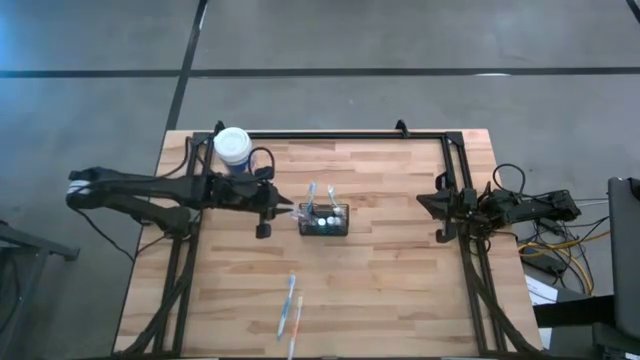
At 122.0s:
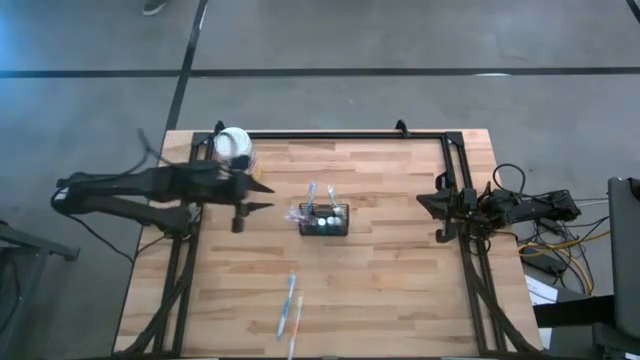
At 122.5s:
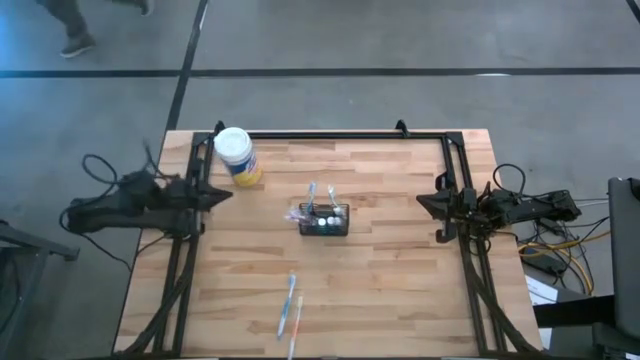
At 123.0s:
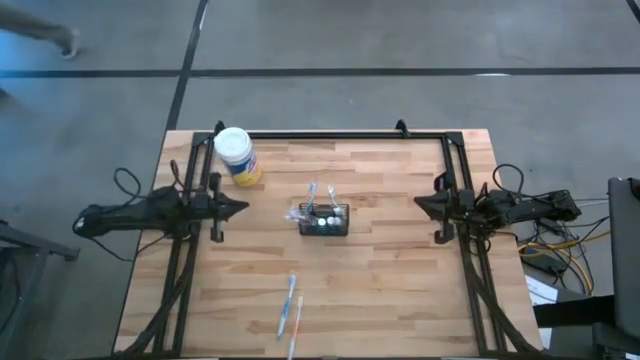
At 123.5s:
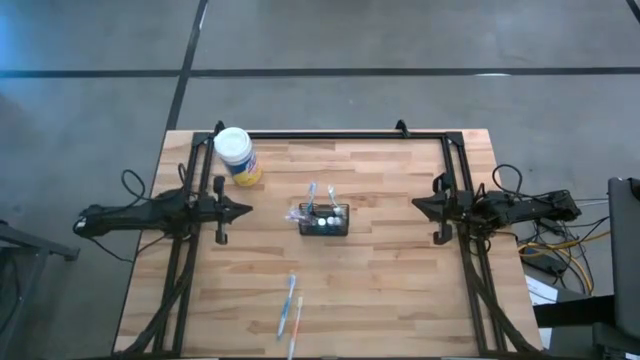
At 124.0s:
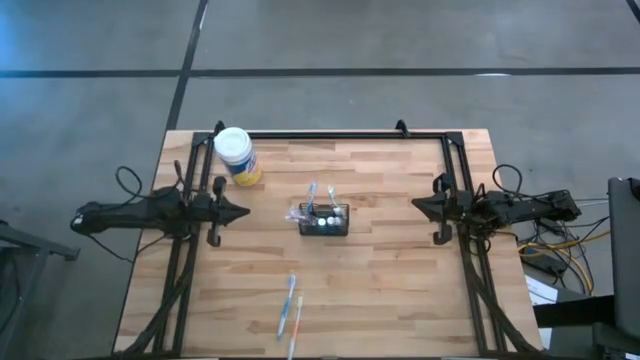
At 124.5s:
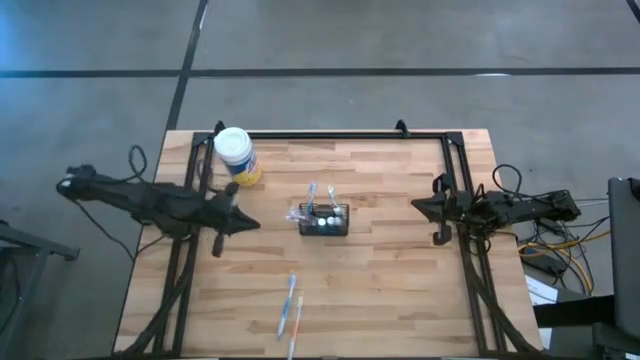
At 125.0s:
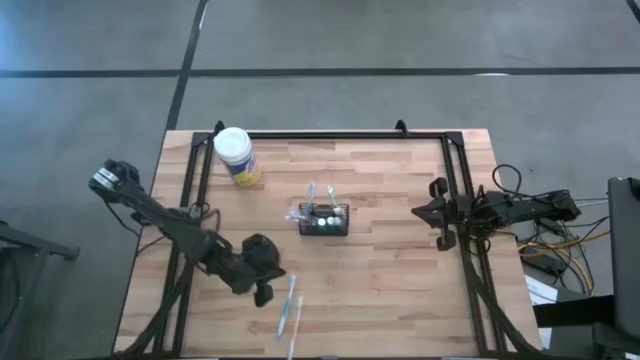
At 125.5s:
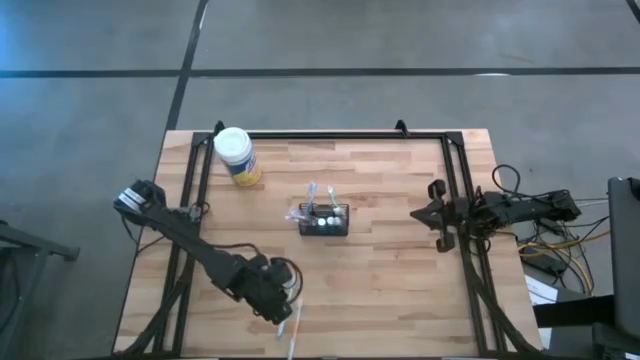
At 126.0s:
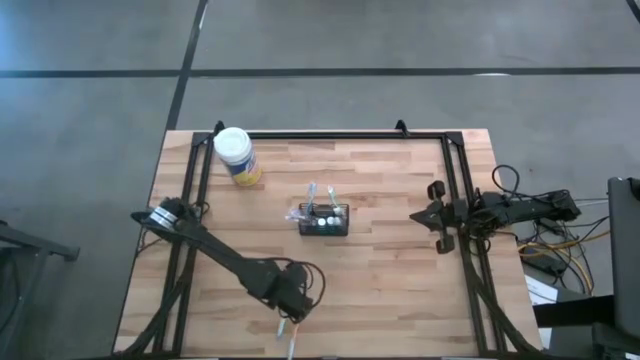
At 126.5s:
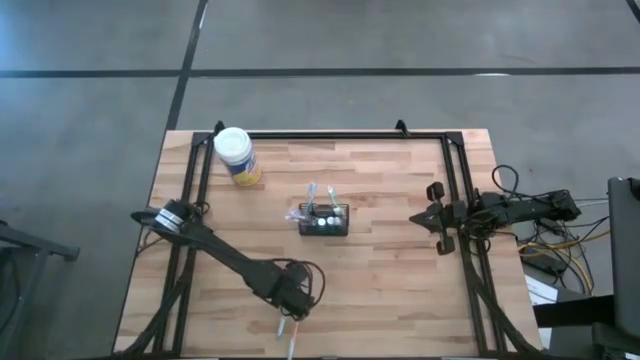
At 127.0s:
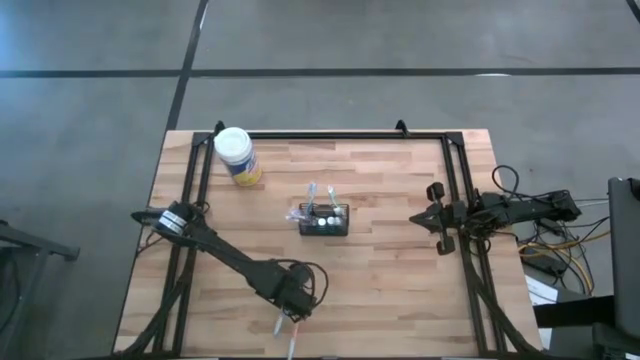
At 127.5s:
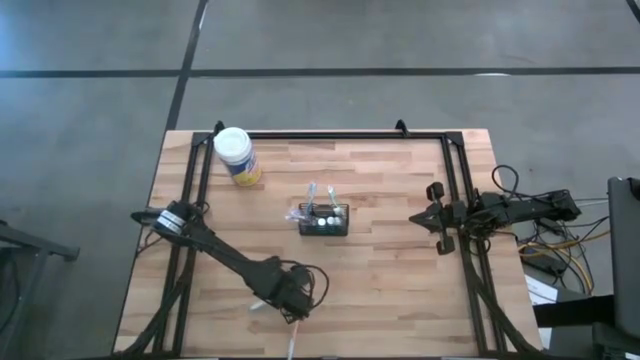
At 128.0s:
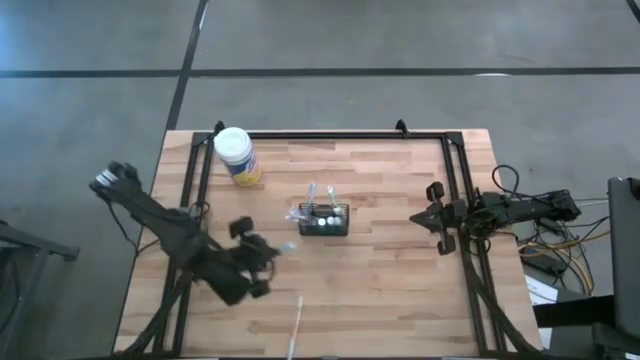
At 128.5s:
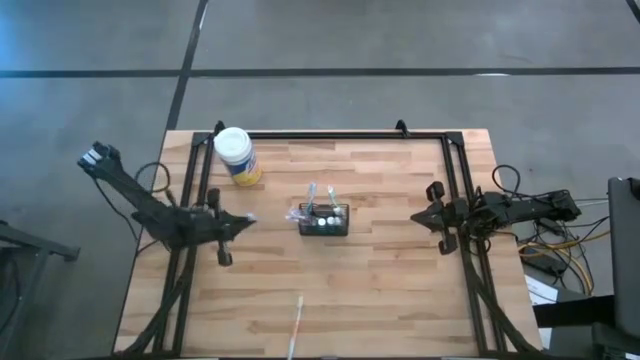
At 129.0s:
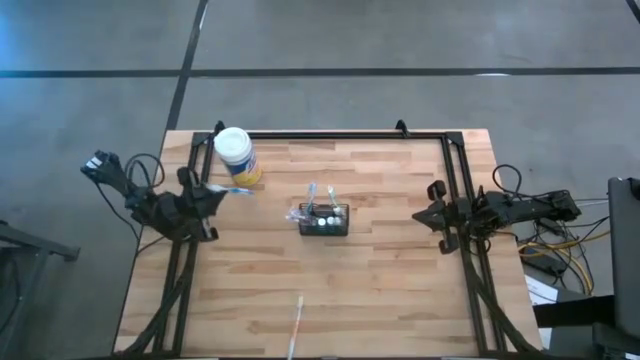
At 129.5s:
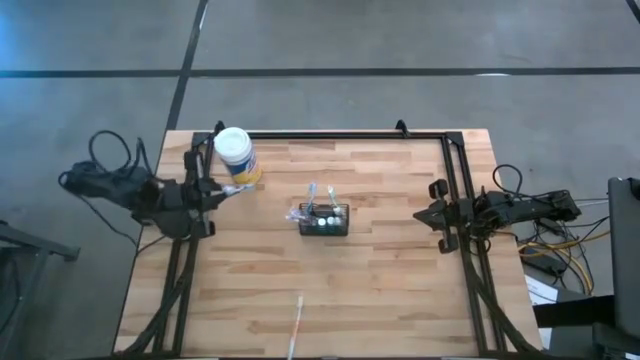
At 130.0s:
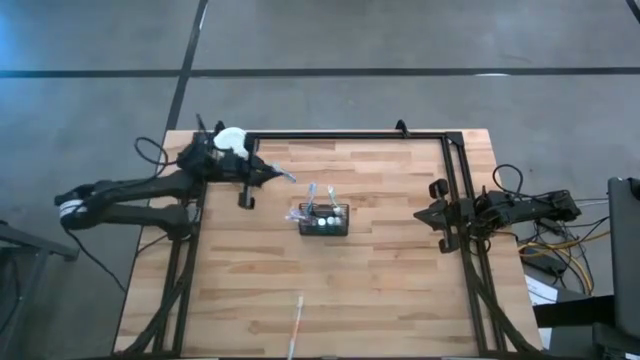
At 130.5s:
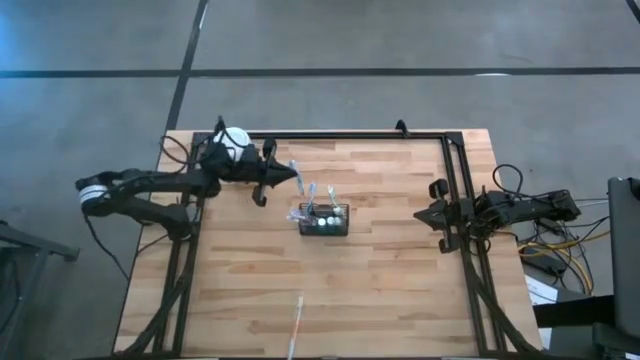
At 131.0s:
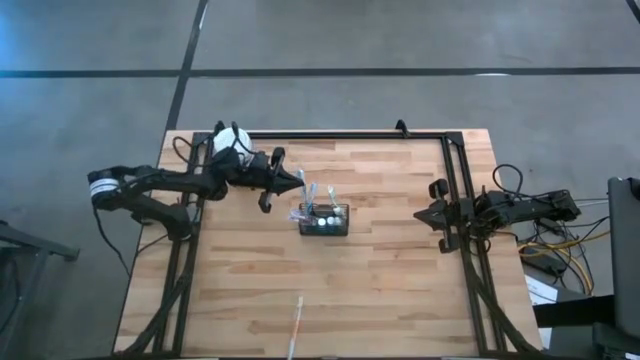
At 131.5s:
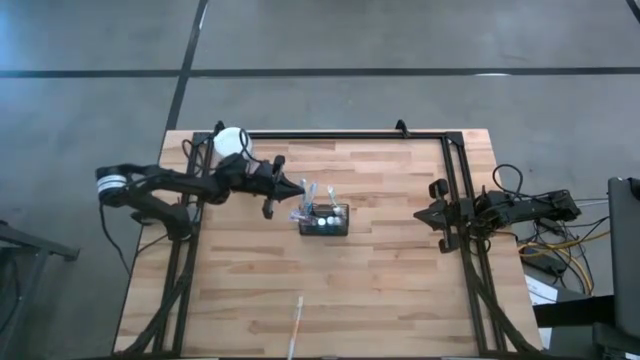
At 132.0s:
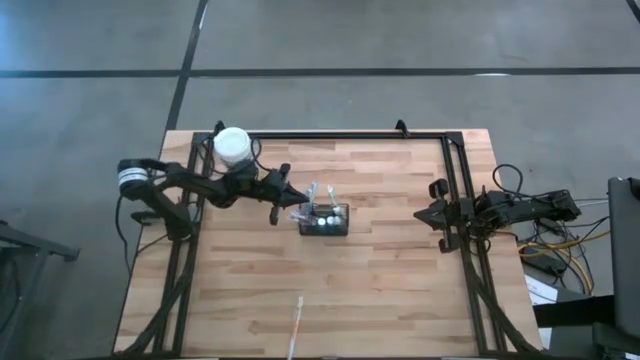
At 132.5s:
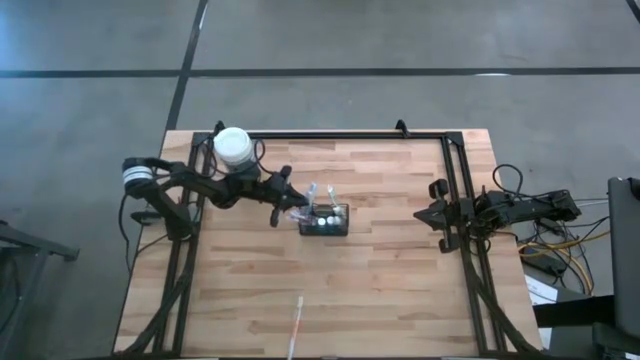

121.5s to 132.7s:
Task: Pick & Place toothbrushing station
Put the blue toothbrush into the wire organizer

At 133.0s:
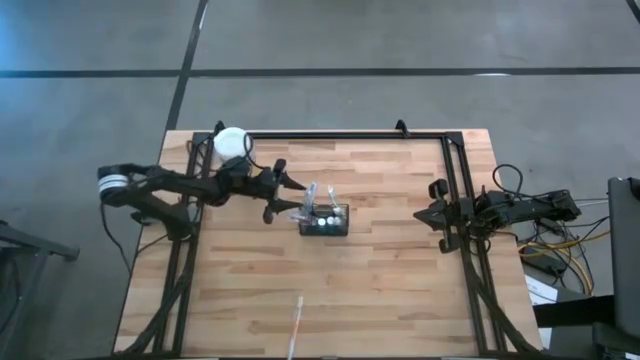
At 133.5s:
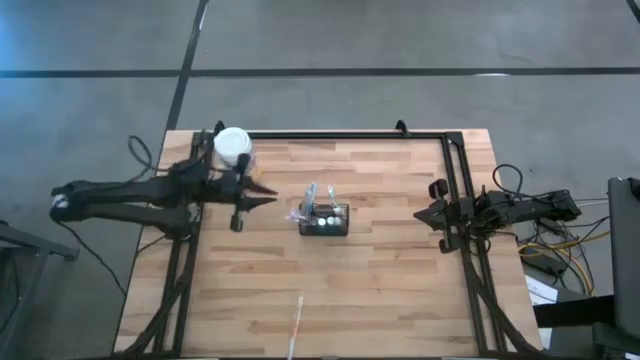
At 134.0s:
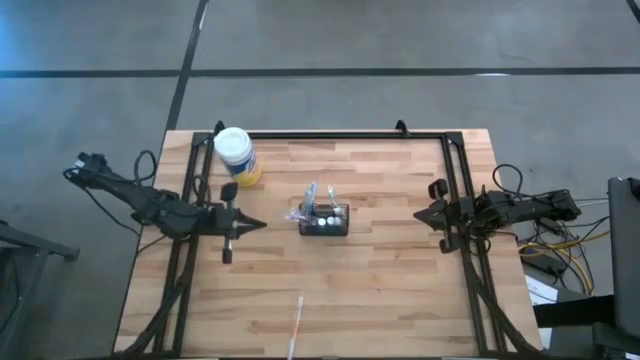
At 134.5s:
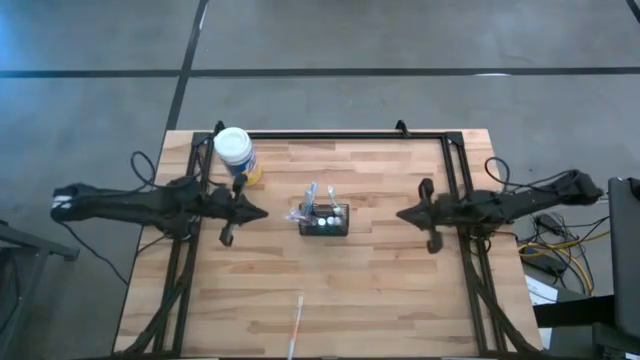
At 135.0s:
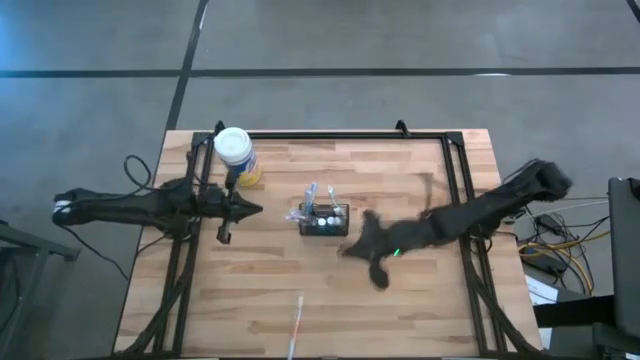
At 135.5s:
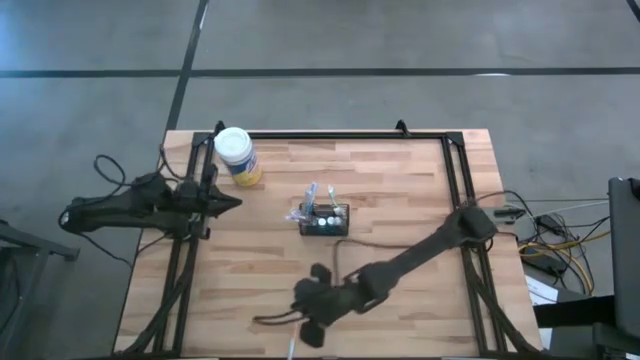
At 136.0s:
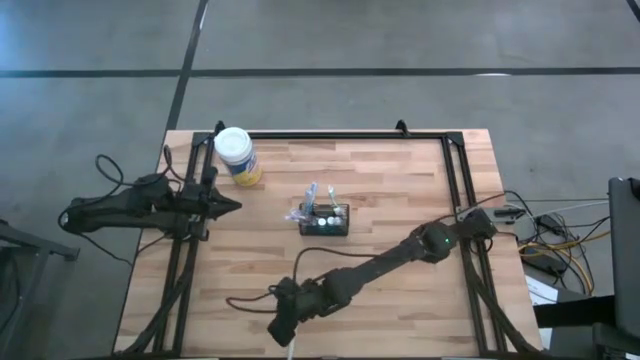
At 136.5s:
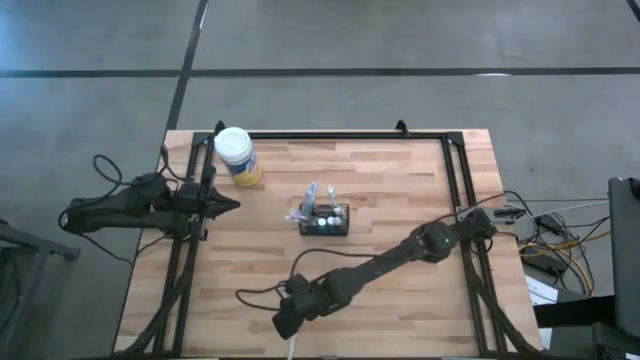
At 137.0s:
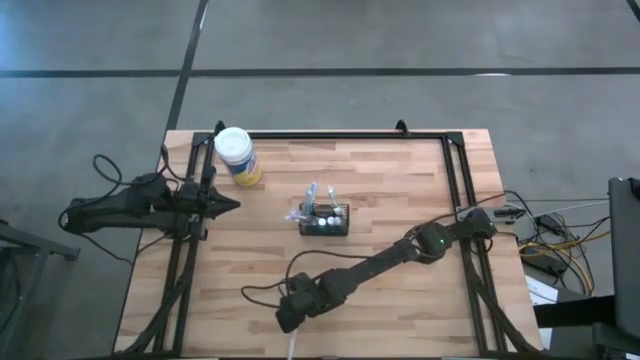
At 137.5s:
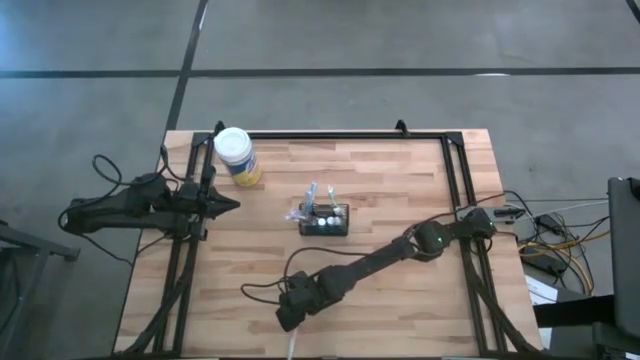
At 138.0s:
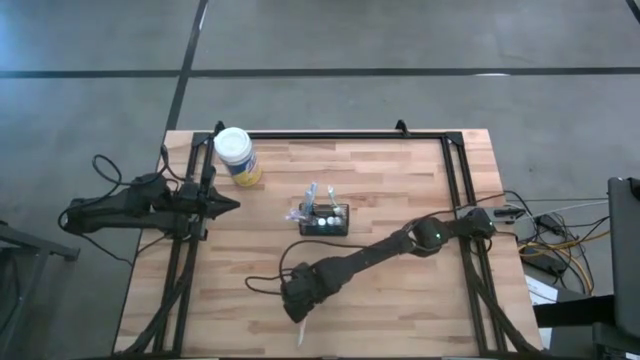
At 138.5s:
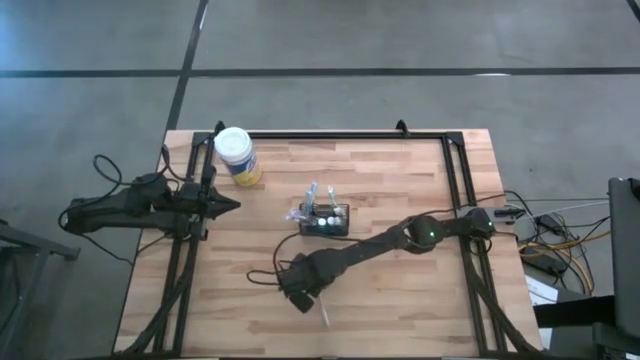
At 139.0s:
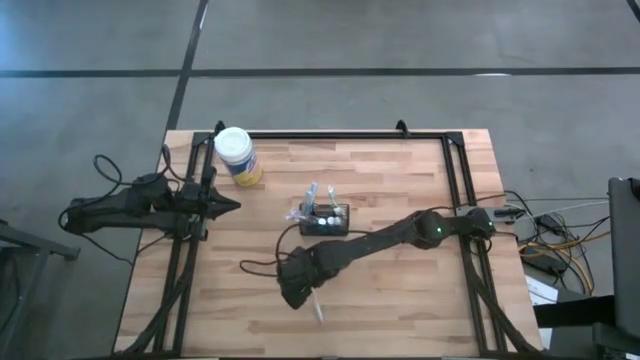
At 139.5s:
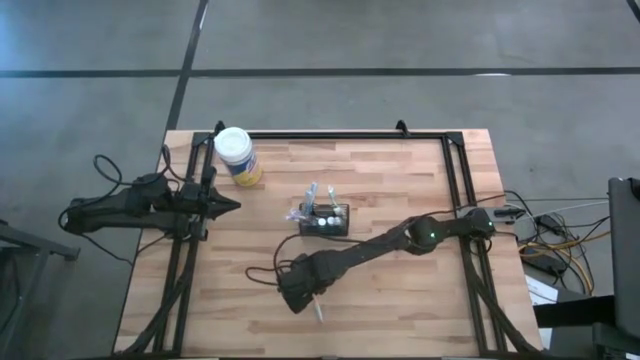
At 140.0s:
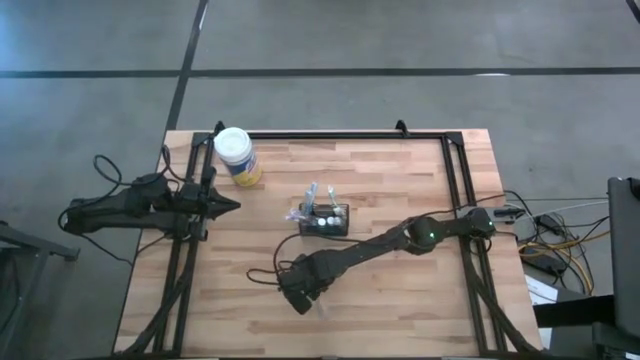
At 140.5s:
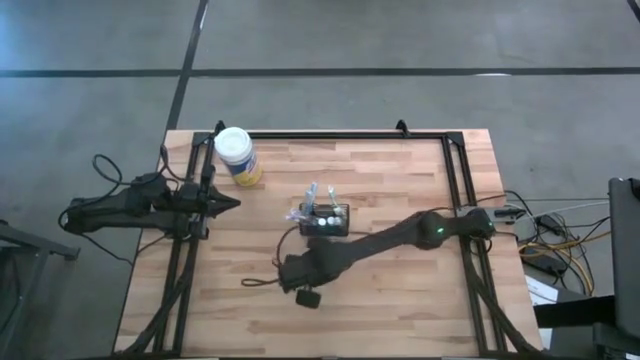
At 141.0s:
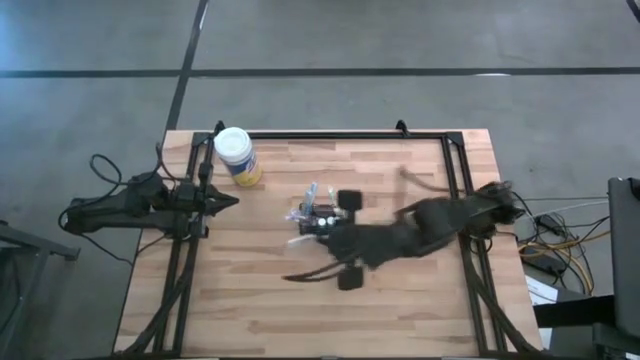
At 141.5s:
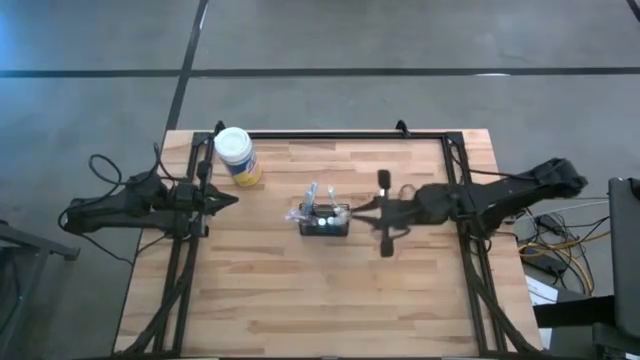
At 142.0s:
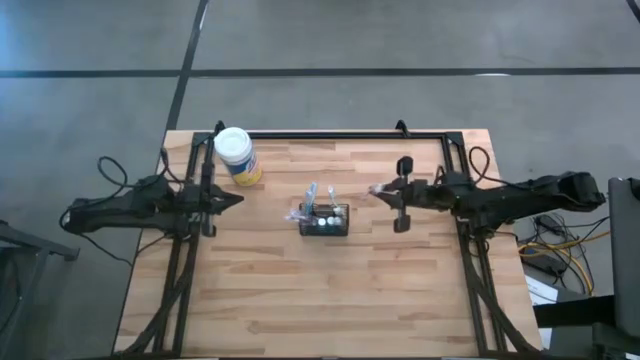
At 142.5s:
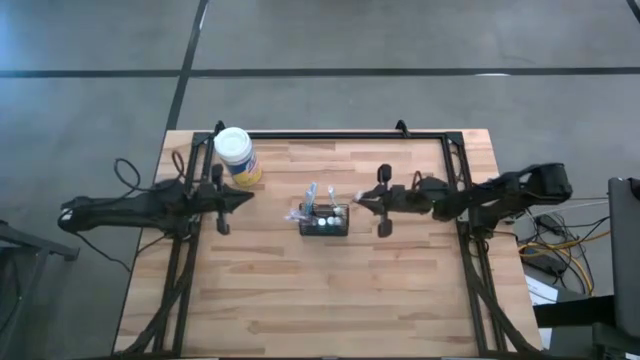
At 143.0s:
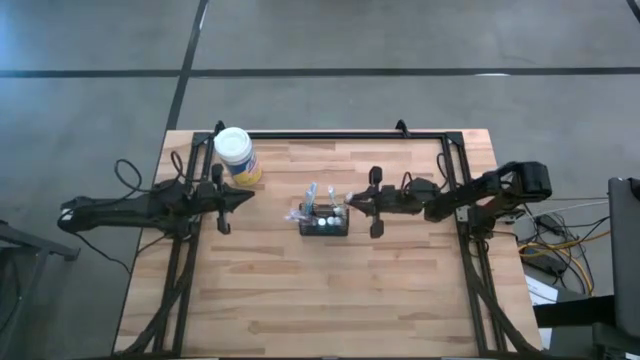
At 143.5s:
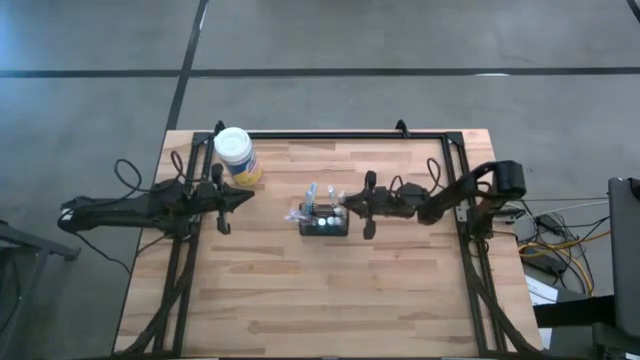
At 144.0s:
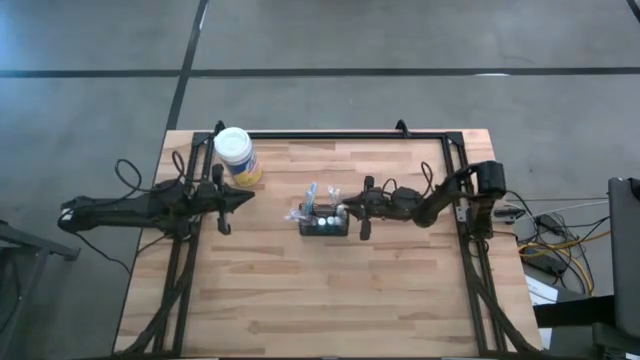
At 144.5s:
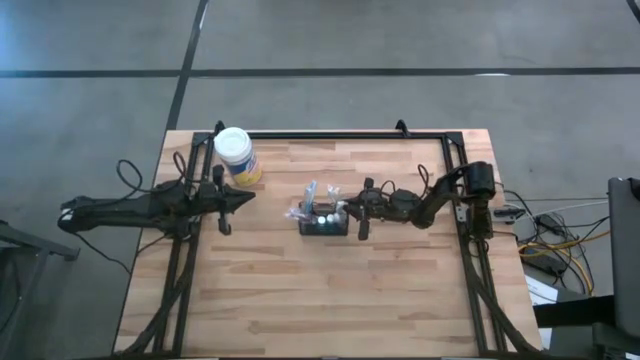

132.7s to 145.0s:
Put the orange toothbrush into the wire organizer
